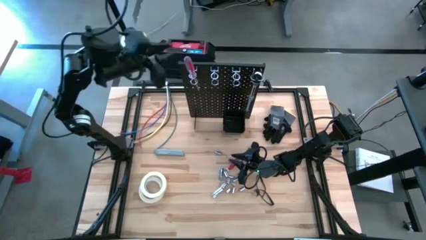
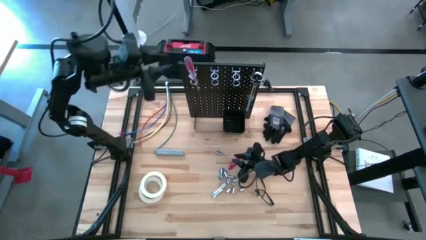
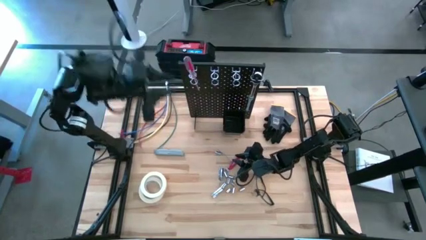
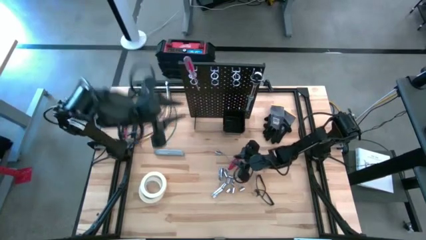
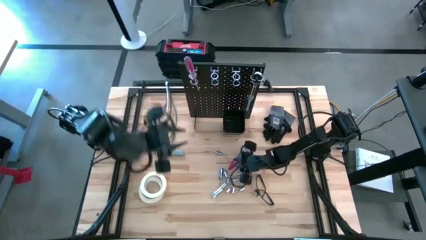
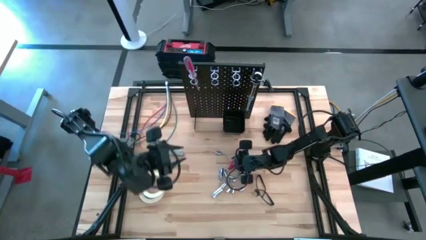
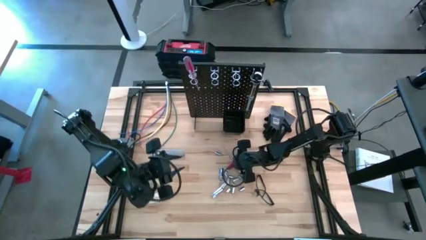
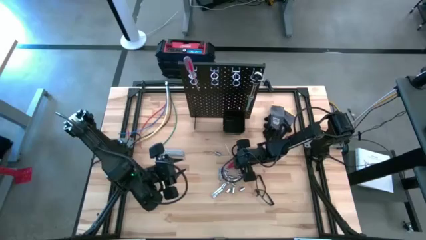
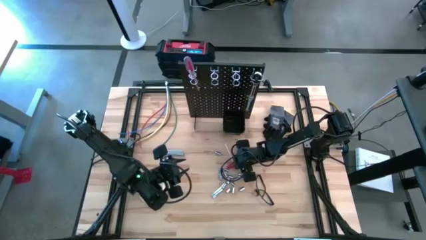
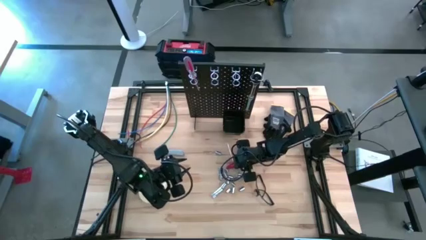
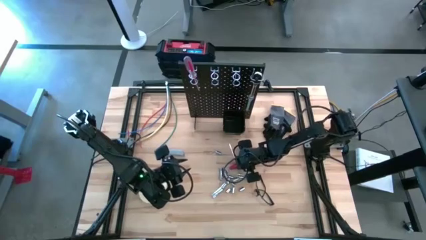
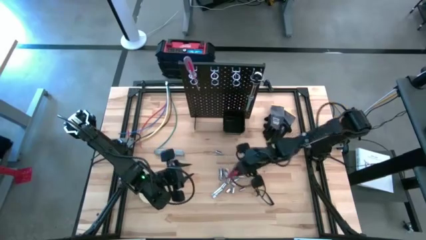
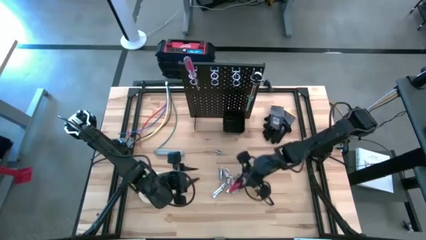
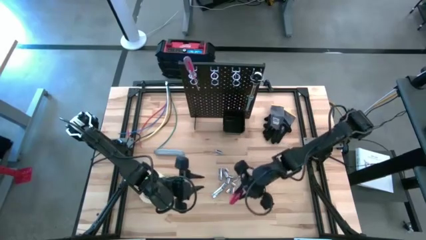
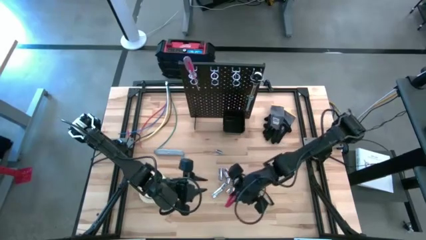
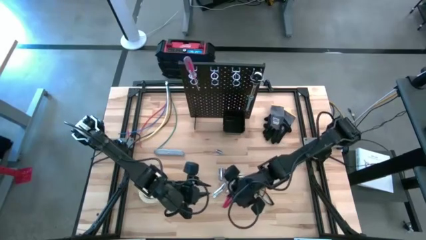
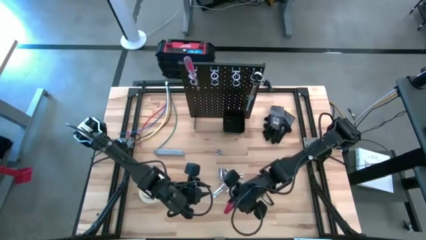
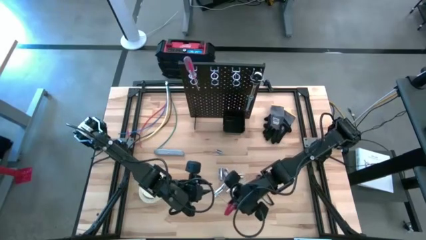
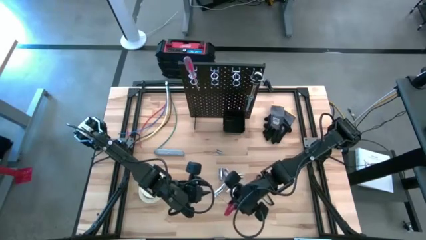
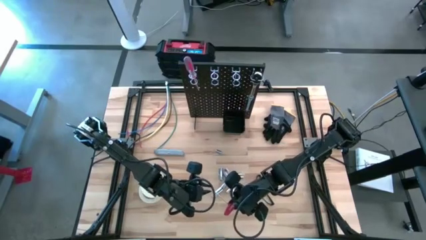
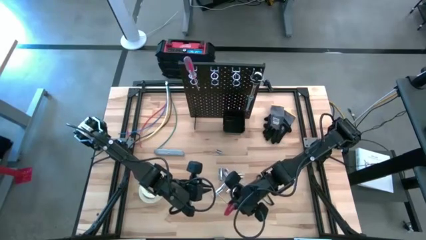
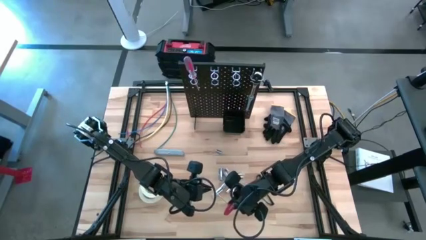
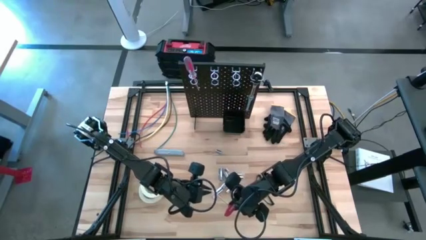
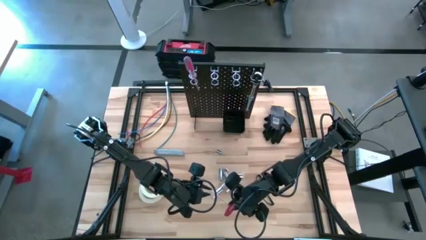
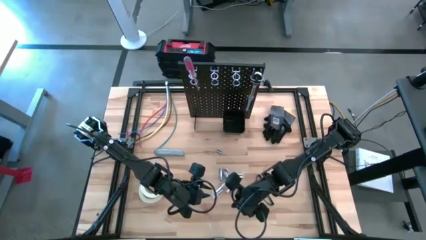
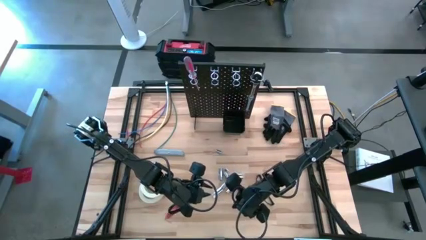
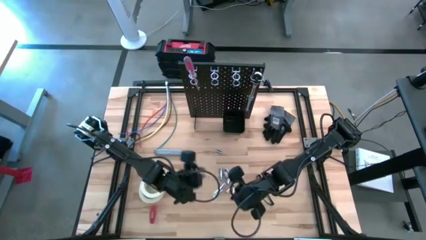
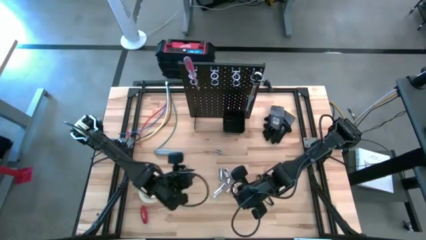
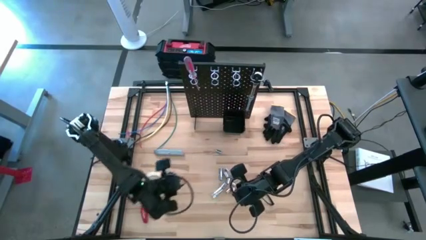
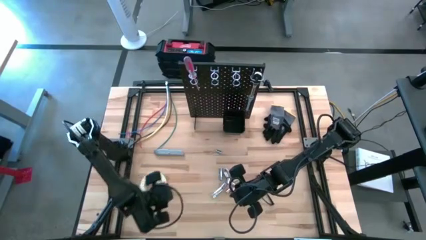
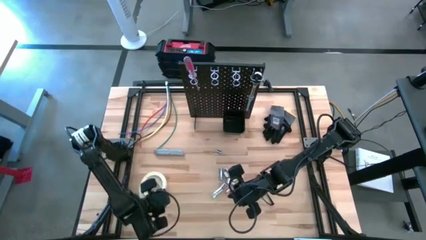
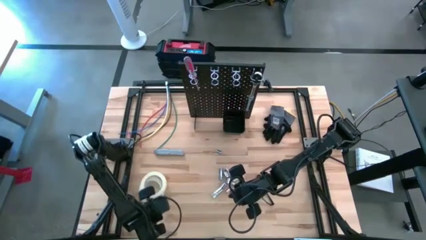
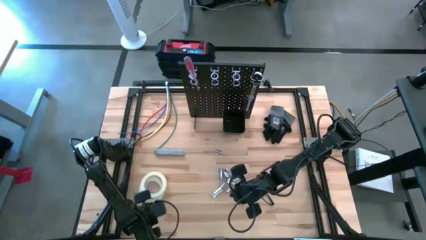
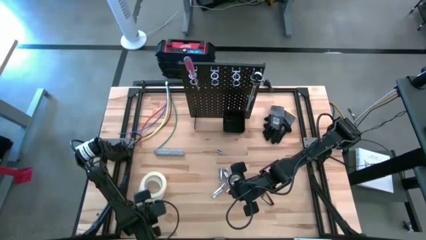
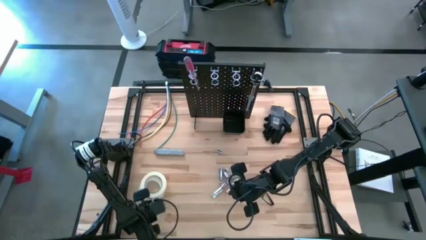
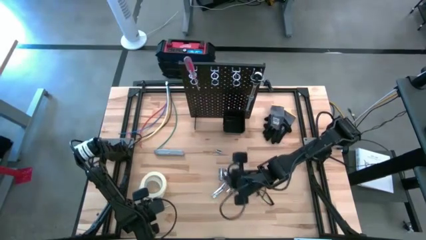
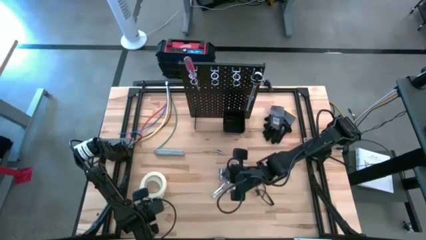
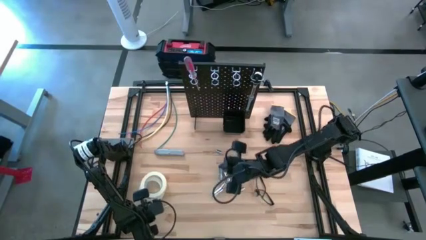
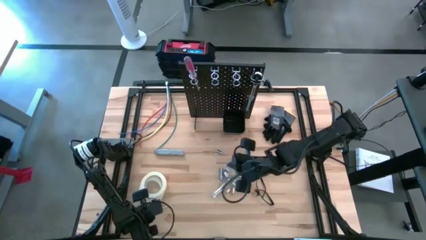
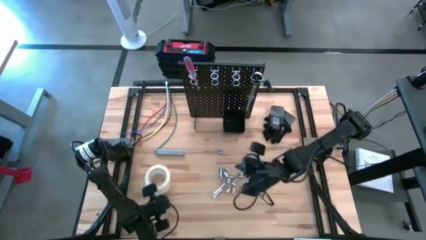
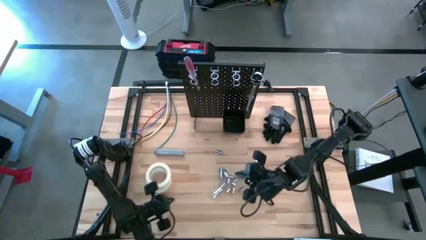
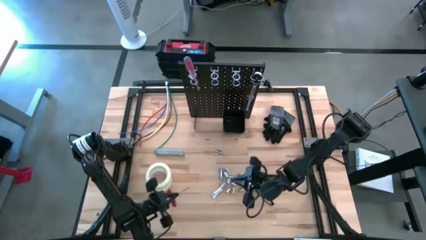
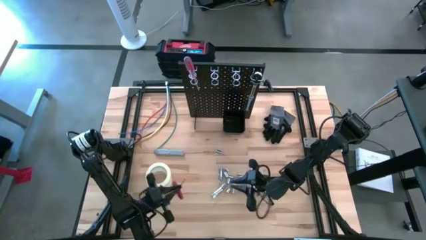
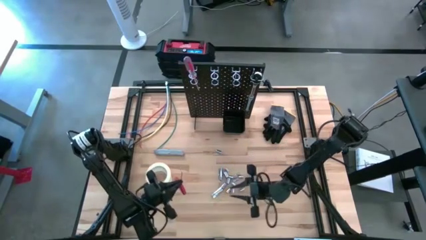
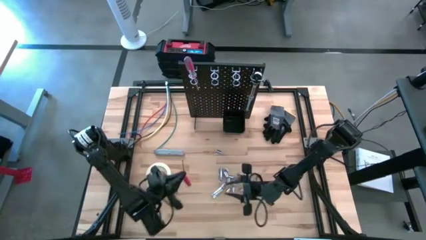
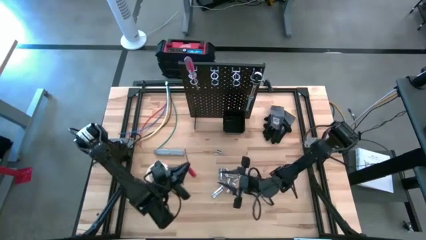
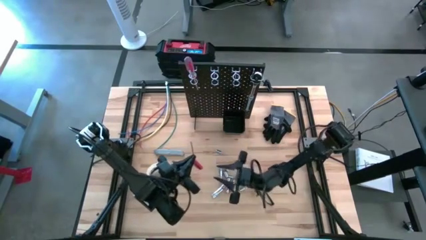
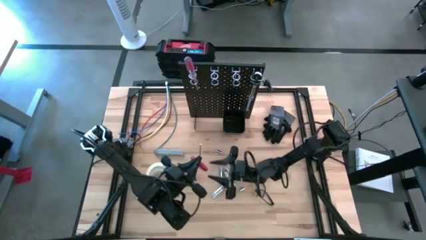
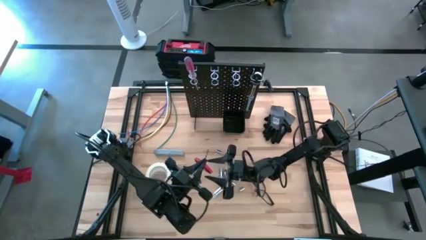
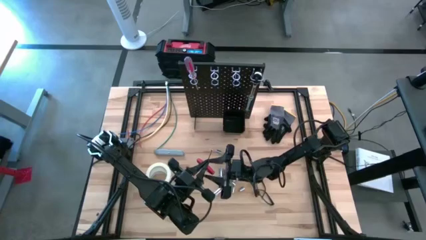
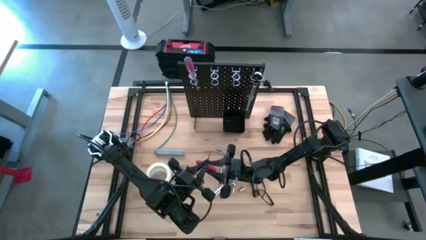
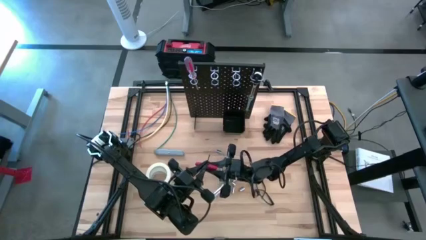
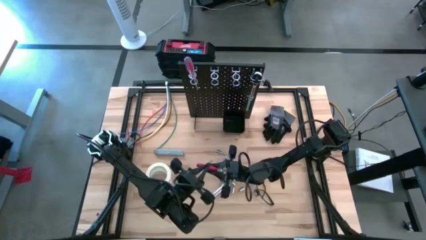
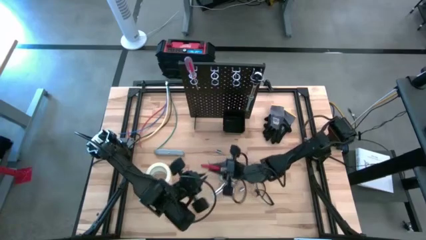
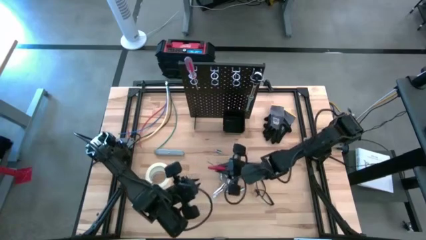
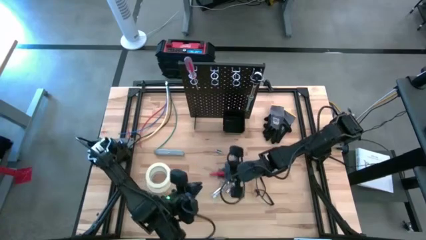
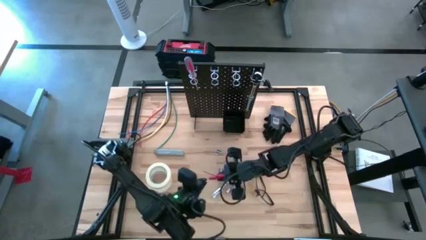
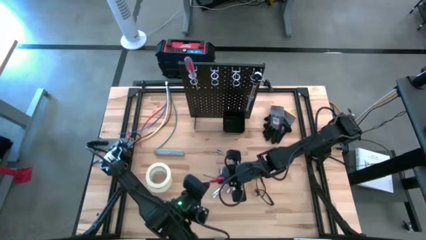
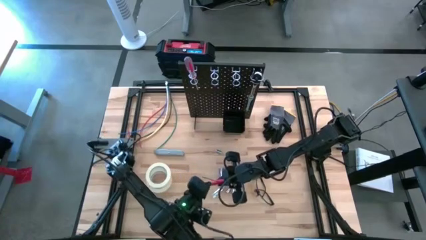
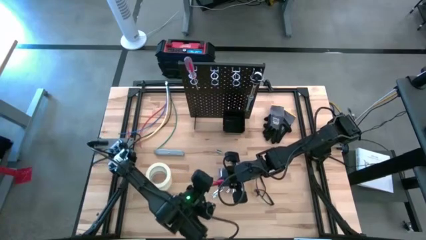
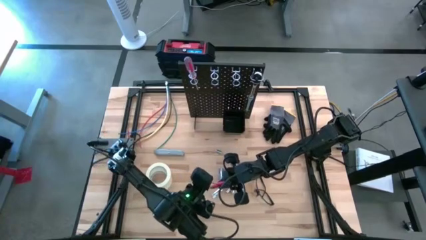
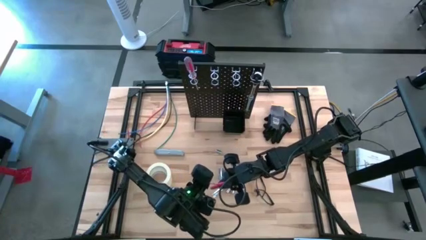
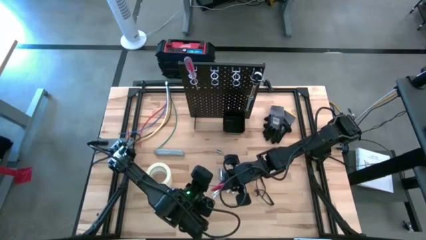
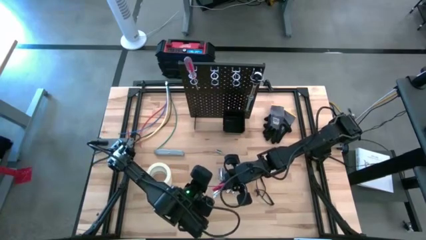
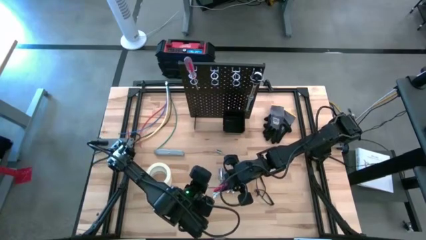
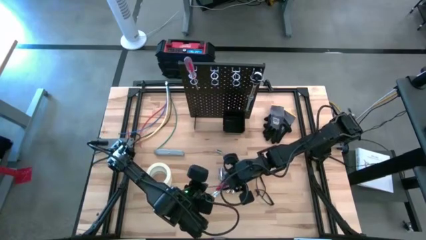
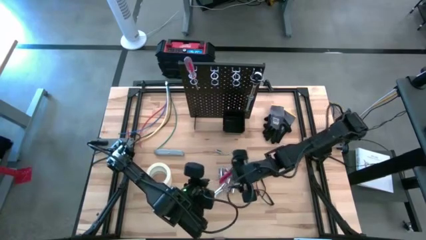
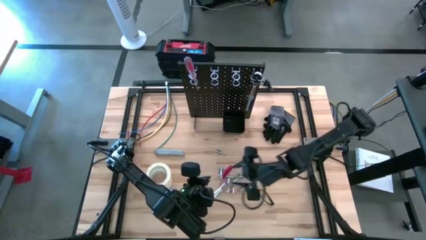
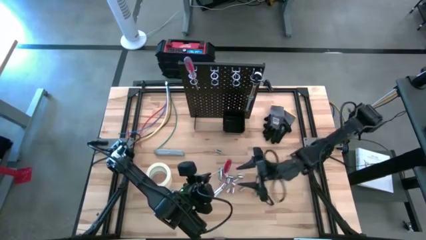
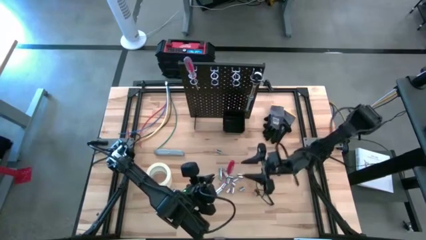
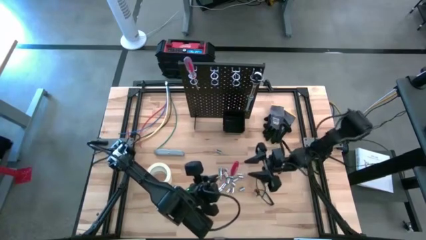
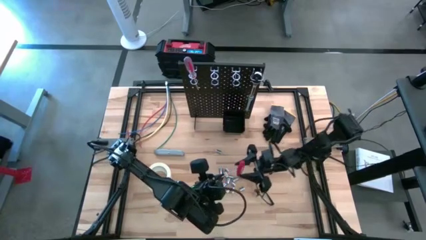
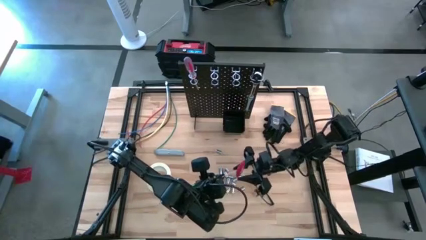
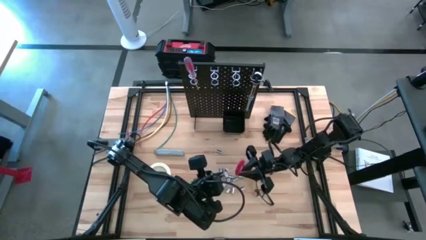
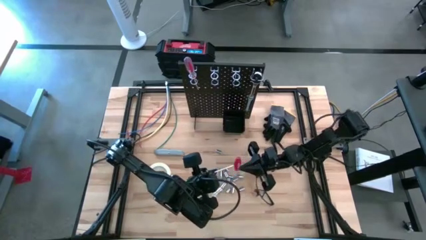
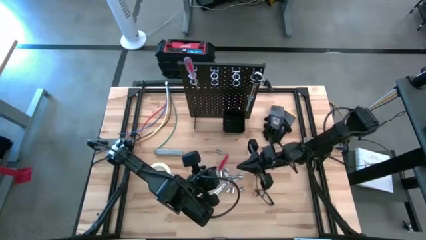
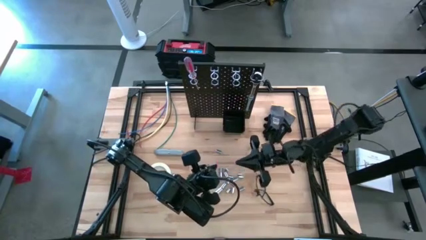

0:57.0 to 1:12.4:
Task: Hang tools onto peg board
Hang the allen wrench on the peg board

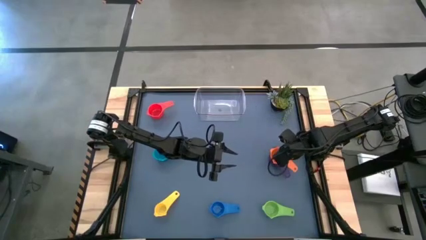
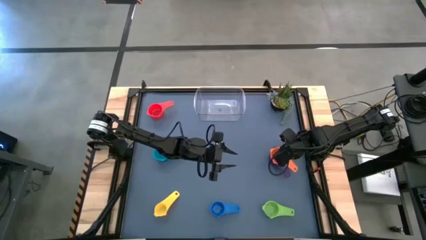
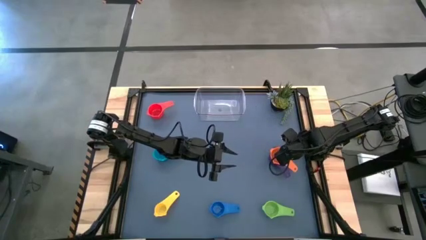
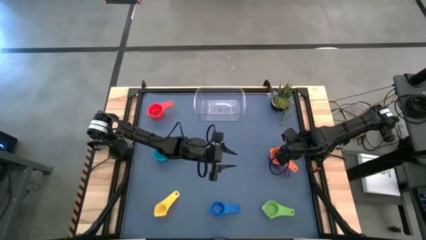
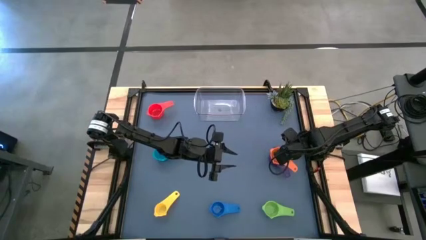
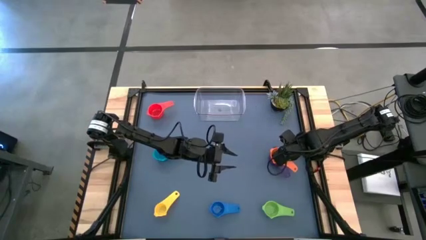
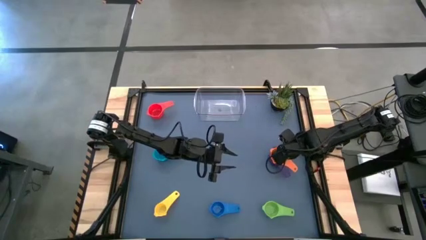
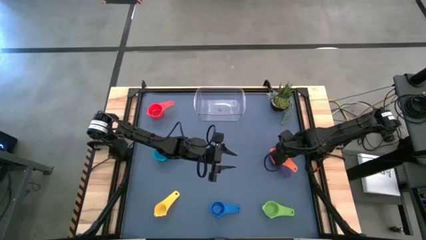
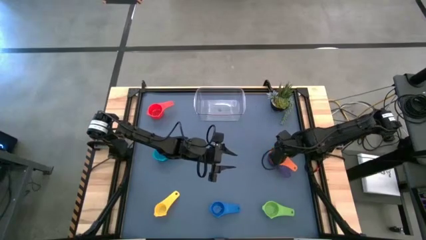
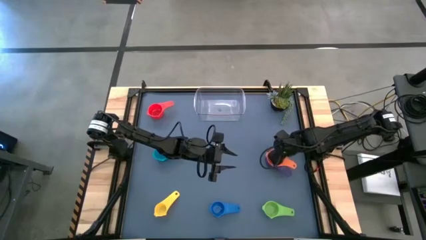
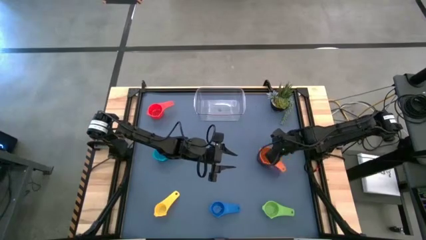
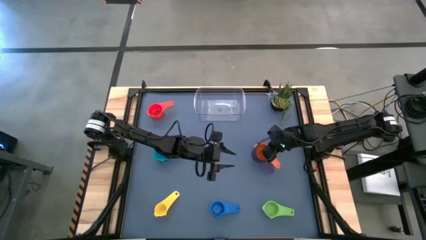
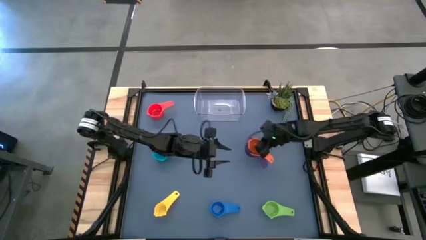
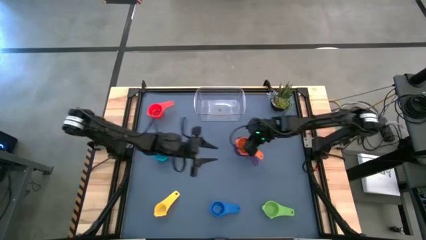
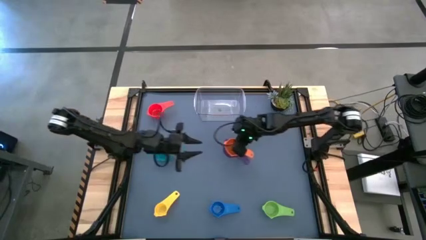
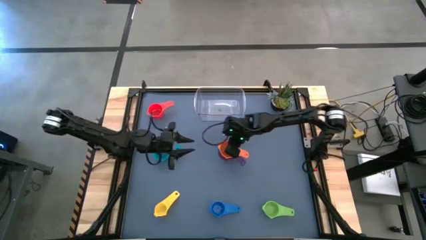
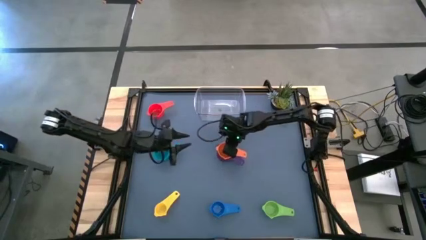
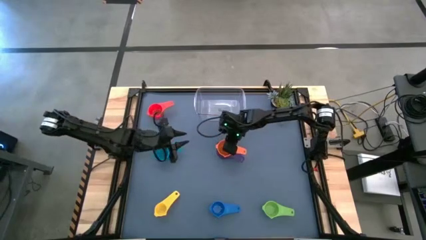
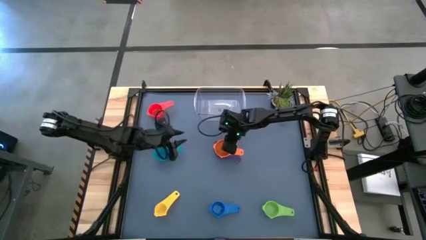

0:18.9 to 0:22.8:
Task: Nest measuring cups in basket
Move the stacked measuring cups to the center of the table
